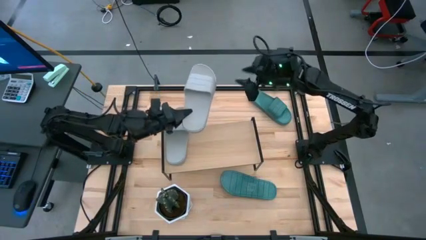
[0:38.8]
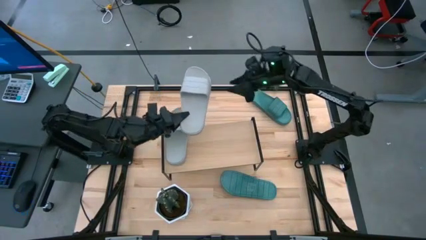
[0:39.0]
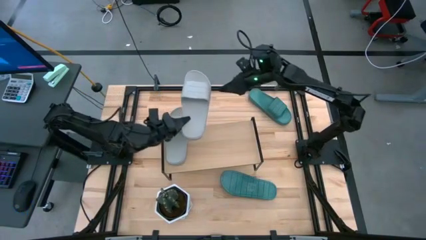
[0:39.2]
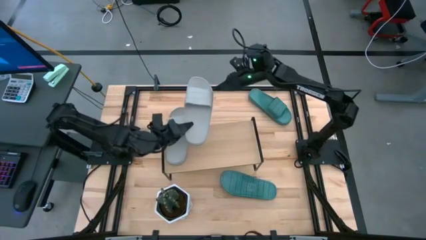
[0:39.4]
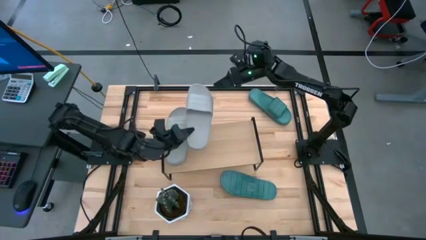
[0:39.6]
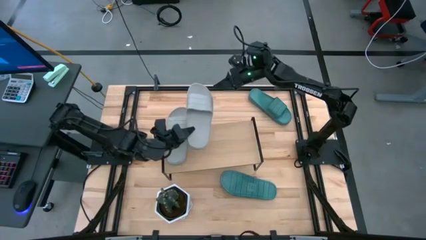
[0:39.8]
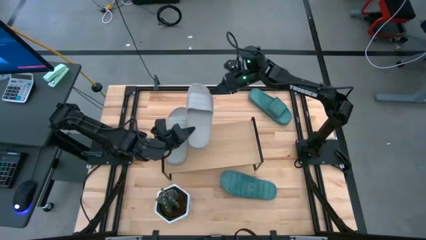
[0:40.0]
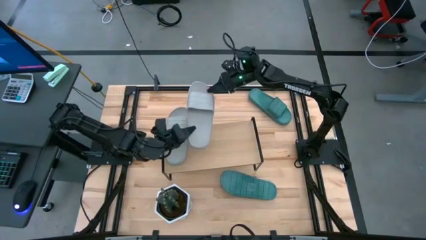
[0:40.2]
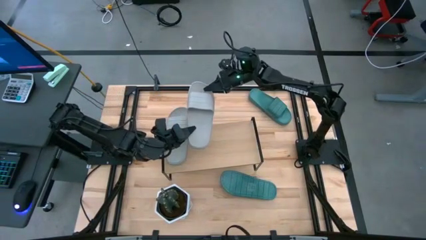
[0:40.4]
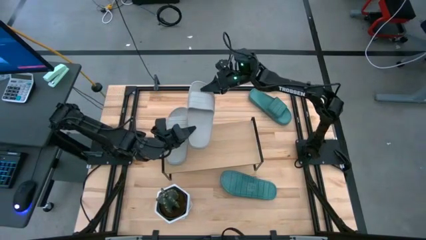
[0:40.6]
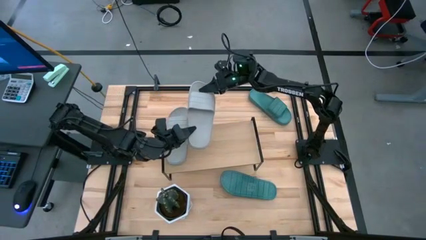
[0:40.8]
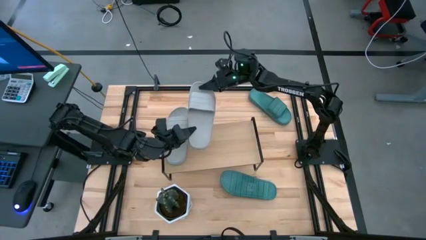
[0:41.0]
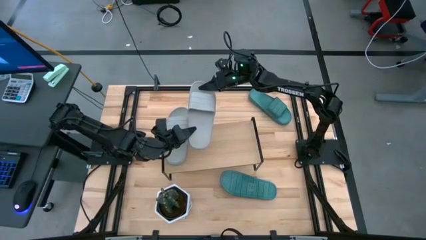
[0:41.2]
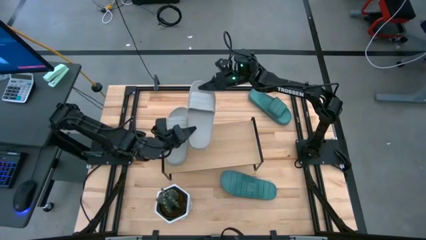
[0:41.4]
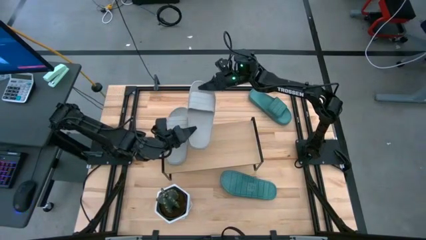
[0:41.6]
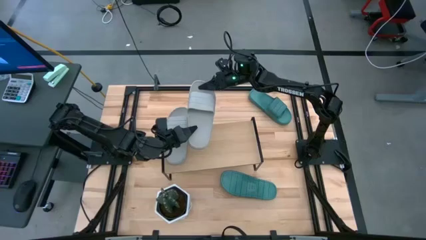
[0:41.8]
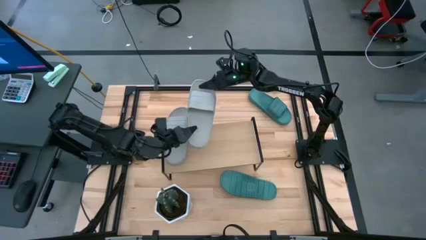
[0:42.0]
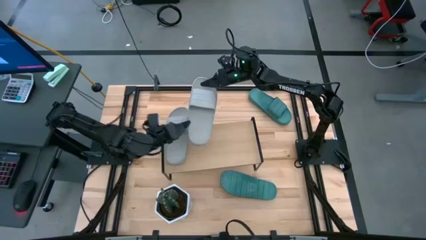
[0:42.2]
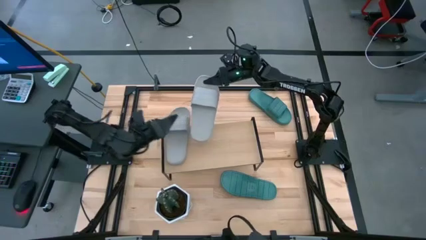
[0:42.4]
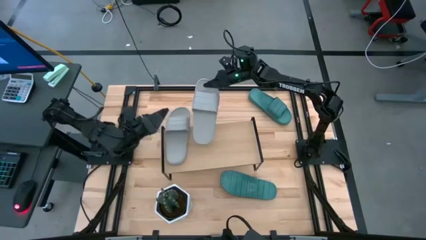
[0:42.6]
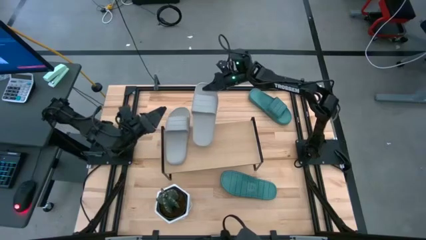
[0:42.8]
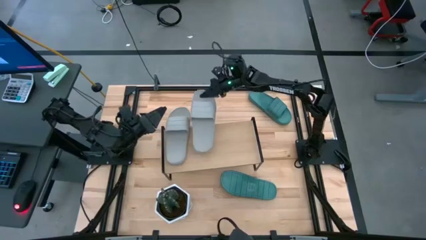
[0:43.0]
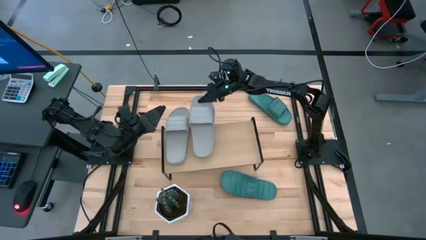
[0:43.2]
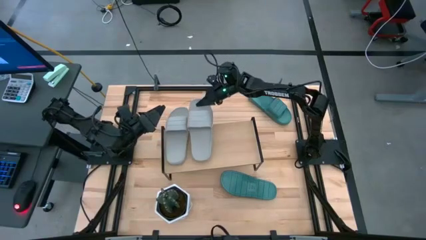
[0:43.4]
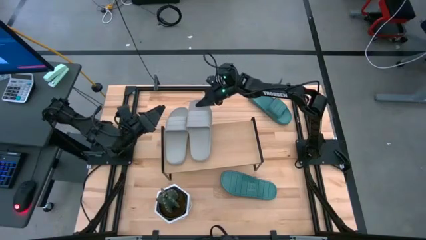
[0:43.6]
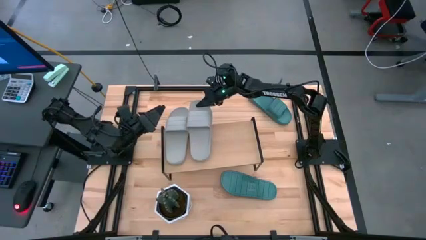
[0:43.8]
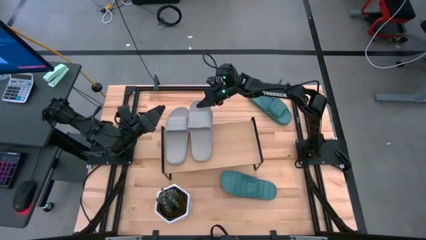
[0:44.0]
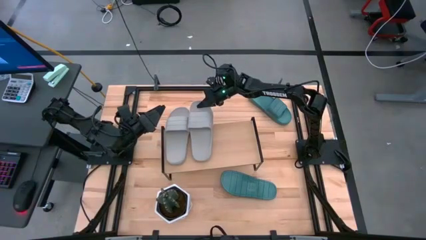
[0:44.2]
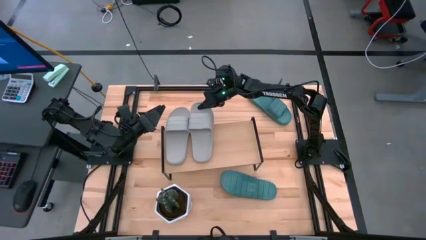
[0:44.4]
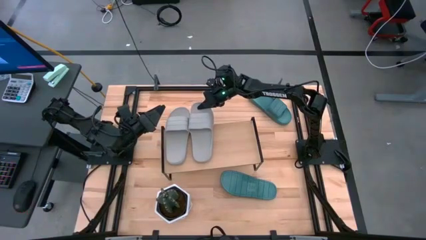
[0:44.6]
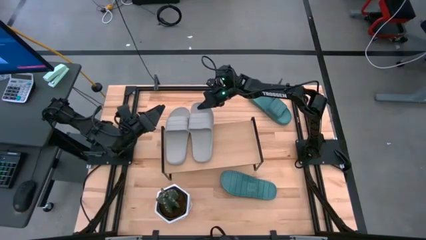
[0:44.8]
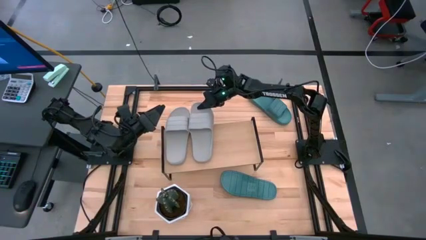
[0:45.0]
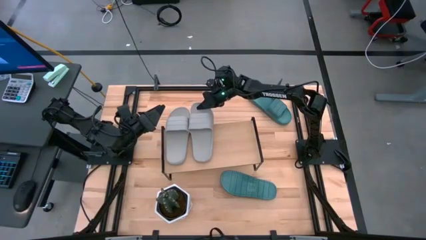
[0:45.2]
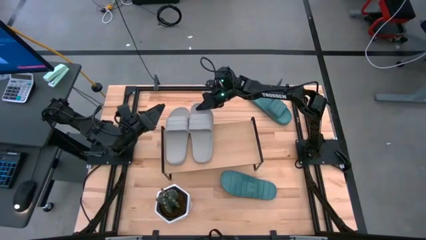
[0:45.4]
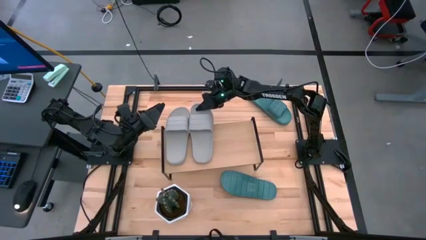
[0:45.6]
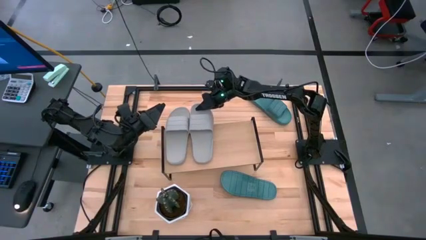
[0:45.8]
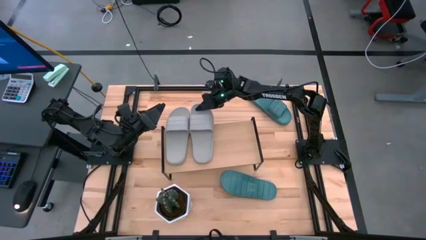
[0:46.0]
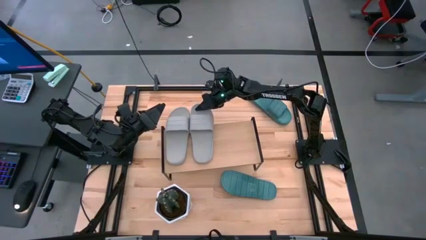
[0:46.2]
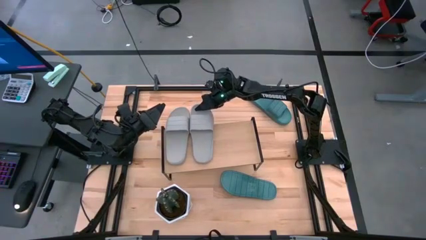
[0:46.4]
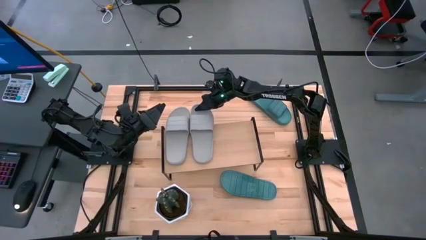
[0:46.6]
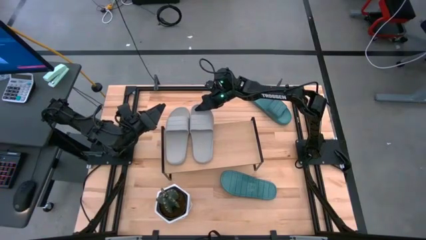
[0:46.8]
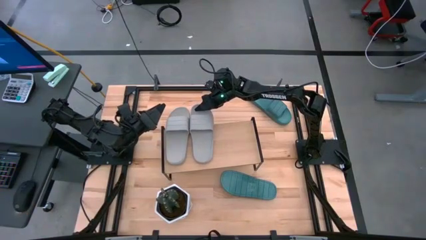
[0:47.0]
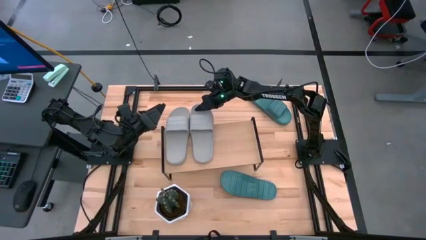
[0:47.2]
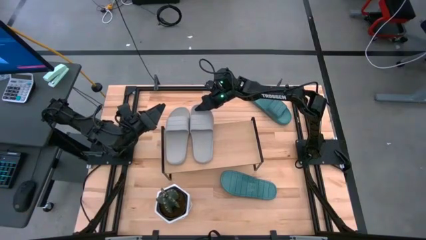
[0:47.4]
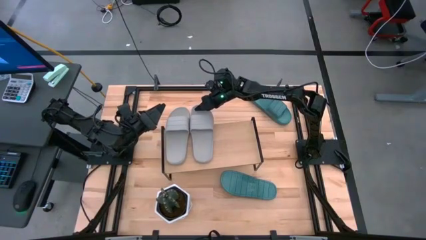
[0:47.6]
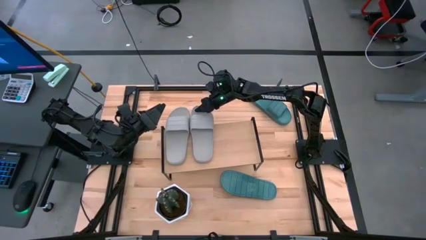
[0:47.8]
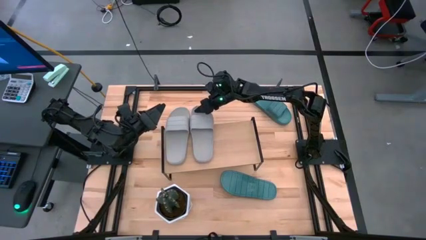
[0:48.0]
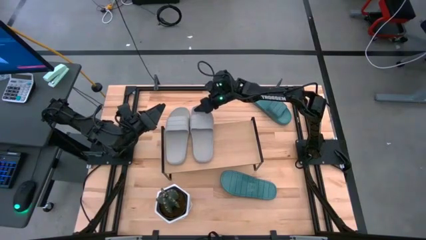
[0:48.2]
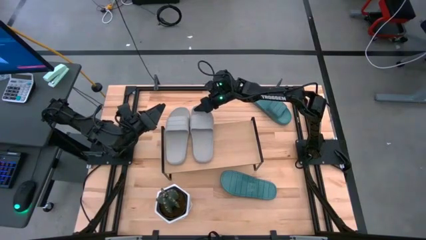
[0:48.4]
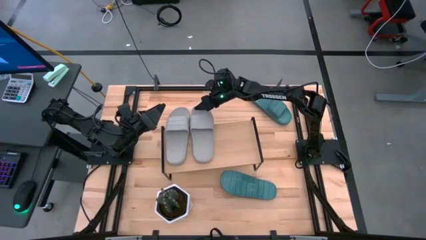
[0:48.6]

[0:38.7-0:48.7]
Task: Pick and place slides into the shelf
Put the gray slide on the shelf

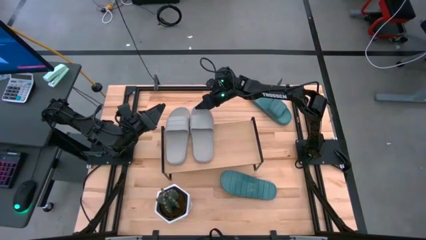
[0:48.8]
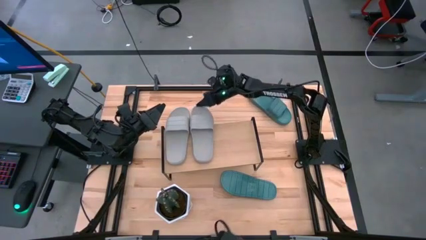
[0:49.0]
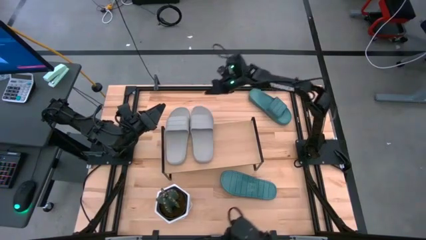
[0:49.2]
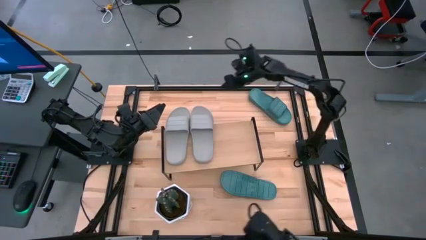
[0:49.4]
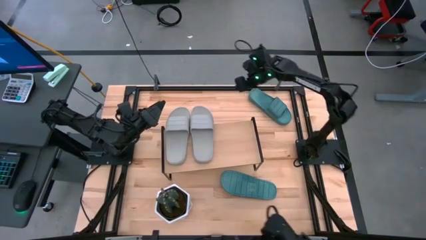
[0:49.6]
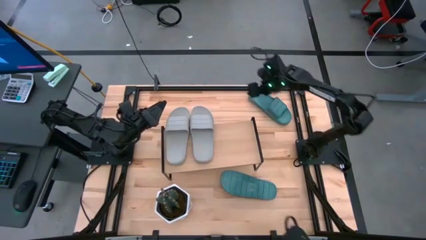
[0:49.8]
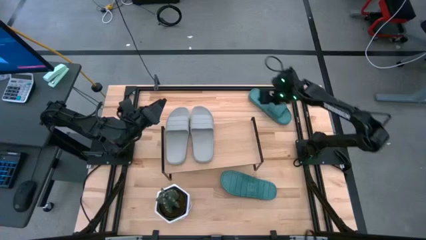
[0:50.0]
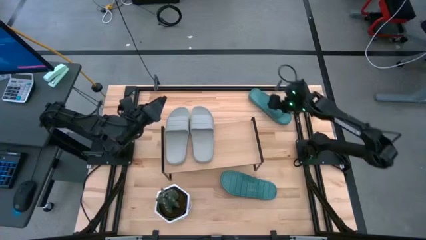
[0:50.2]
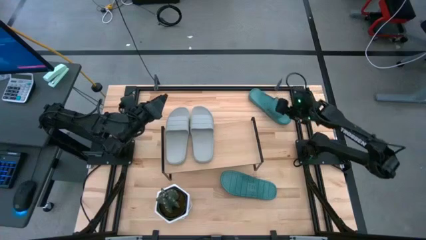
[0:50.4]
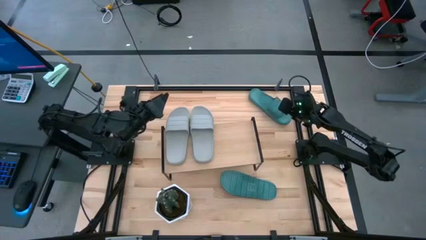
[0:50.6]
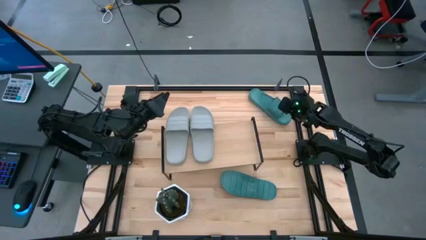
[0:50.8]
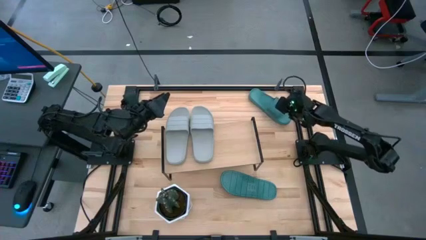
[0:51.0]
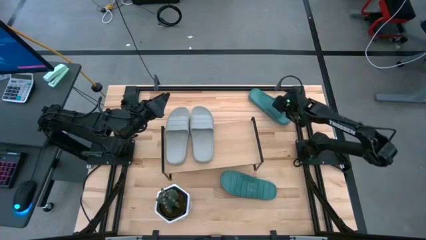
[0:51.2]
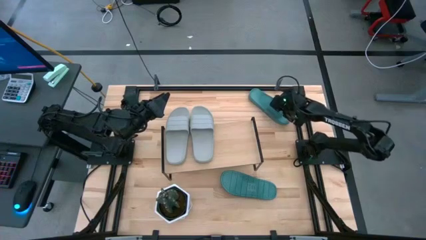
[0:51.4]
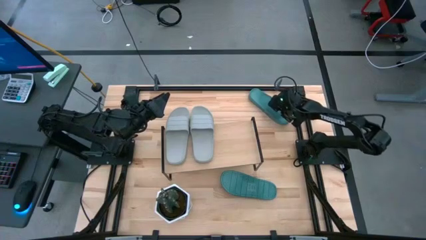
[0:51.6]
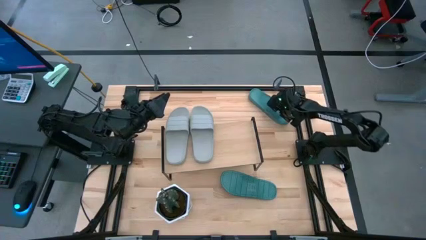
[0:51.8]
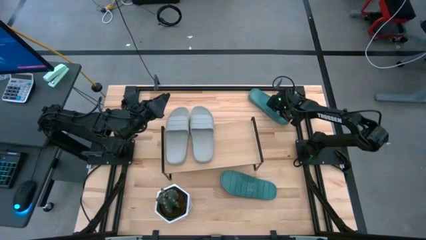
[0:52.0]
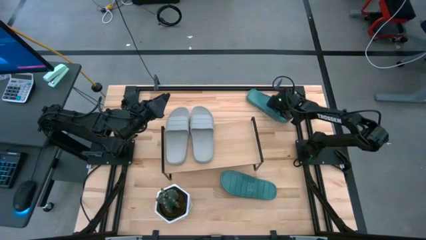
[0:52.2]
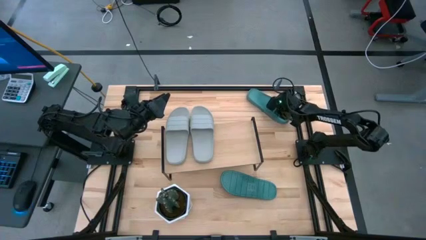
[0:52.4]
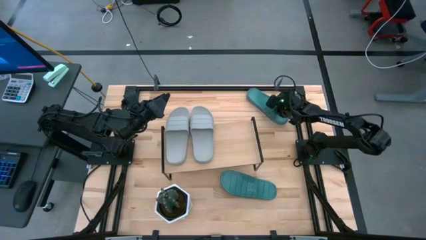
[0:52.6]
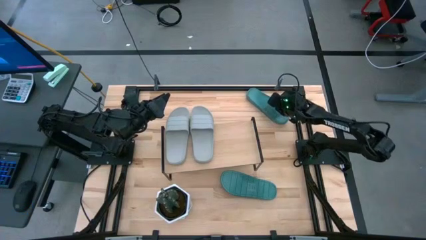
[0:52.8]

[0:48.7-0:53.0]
Put the top green slide on the shelf
